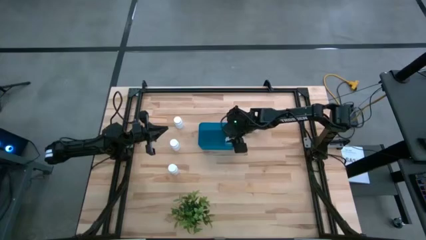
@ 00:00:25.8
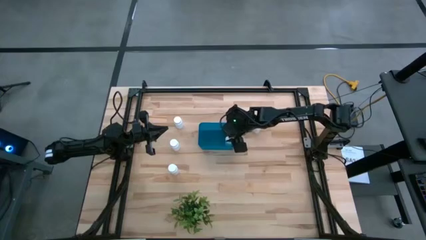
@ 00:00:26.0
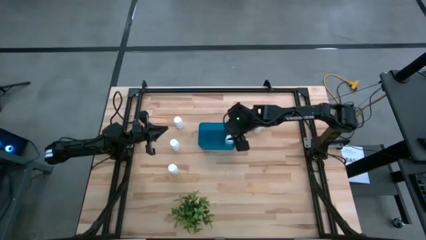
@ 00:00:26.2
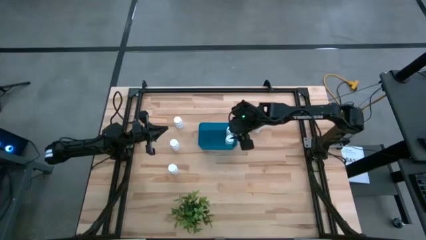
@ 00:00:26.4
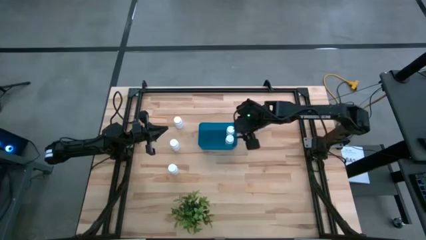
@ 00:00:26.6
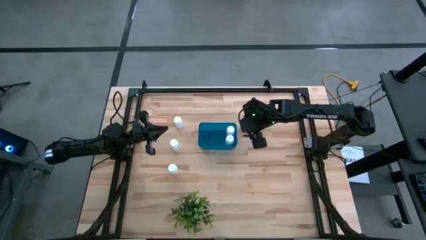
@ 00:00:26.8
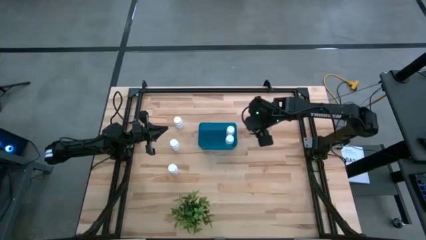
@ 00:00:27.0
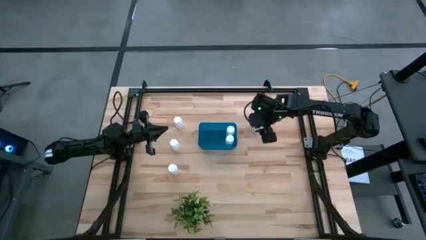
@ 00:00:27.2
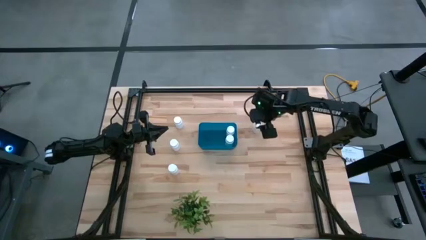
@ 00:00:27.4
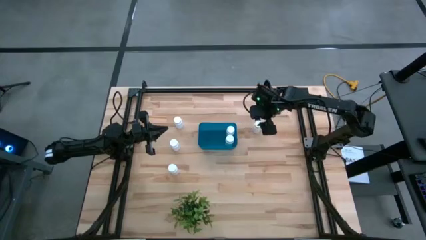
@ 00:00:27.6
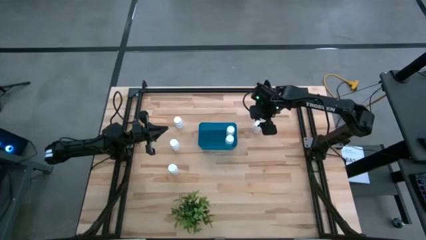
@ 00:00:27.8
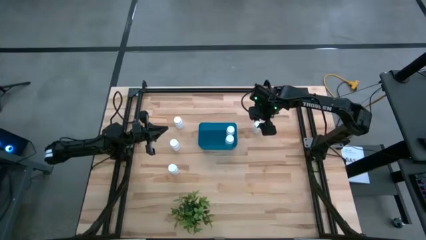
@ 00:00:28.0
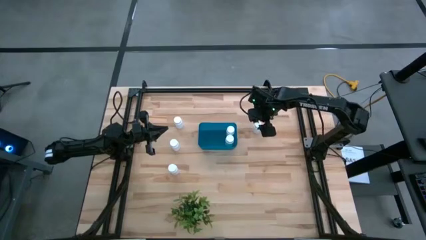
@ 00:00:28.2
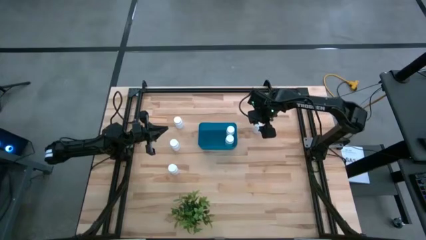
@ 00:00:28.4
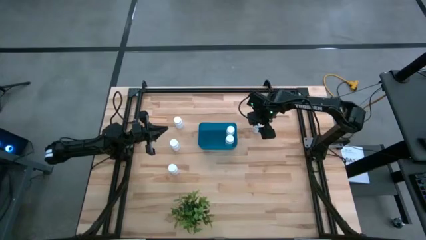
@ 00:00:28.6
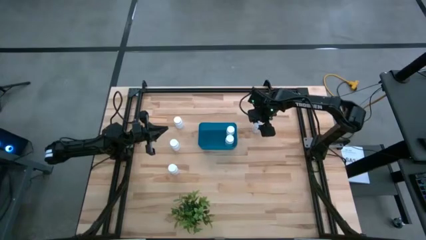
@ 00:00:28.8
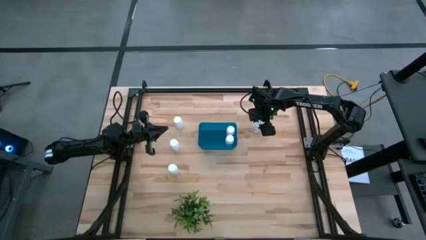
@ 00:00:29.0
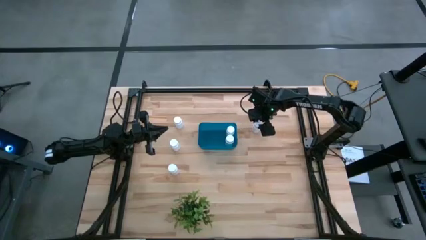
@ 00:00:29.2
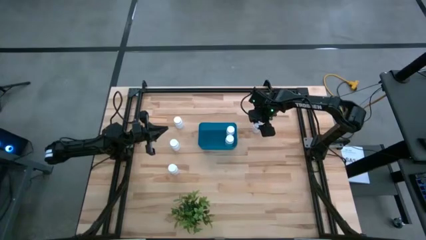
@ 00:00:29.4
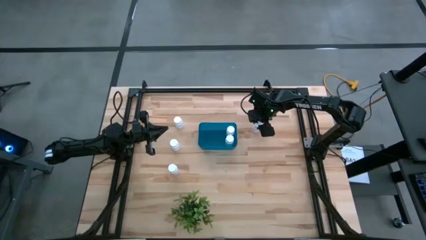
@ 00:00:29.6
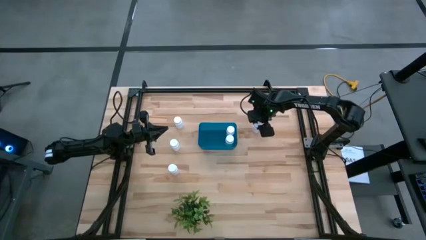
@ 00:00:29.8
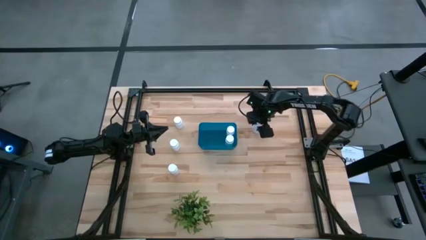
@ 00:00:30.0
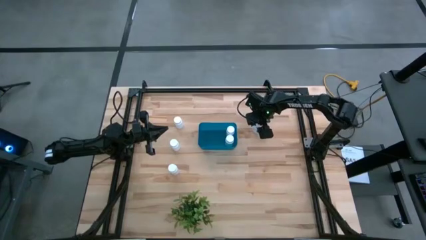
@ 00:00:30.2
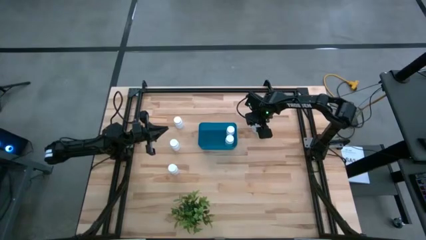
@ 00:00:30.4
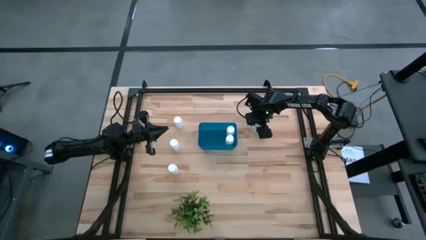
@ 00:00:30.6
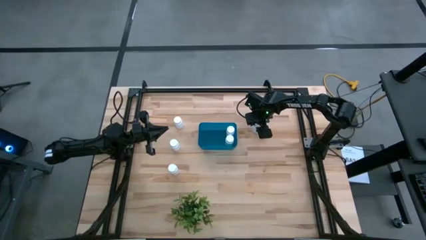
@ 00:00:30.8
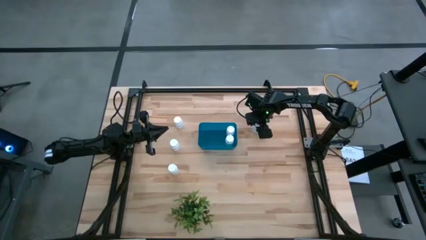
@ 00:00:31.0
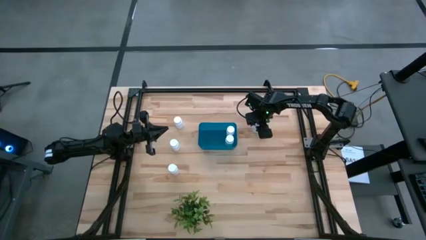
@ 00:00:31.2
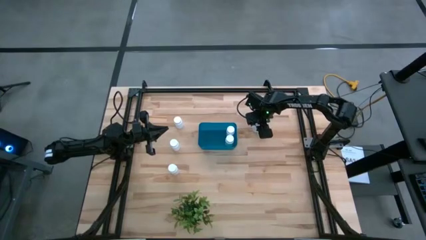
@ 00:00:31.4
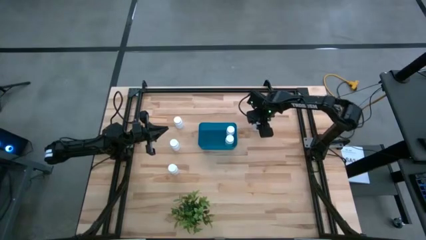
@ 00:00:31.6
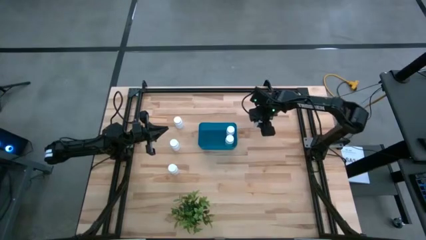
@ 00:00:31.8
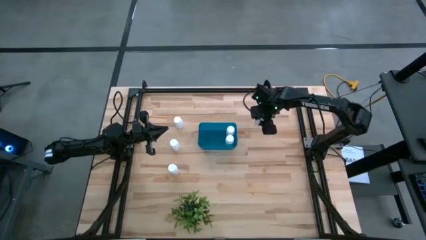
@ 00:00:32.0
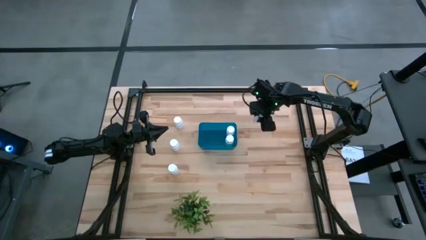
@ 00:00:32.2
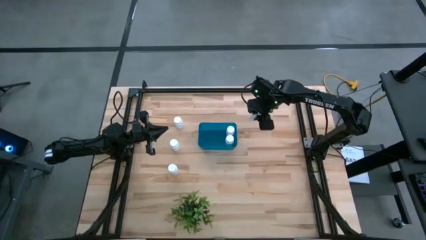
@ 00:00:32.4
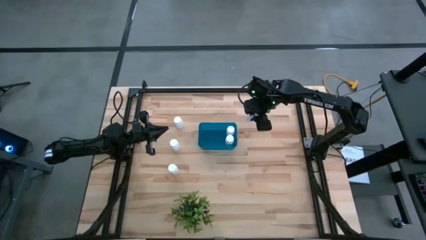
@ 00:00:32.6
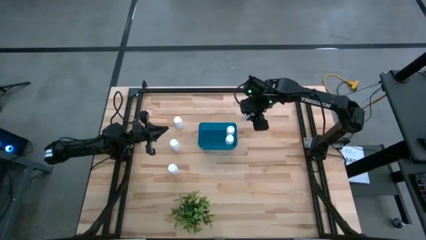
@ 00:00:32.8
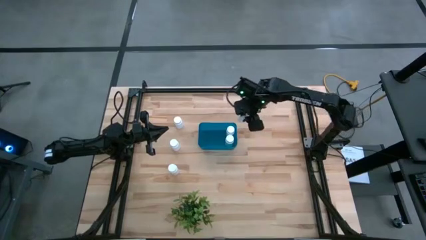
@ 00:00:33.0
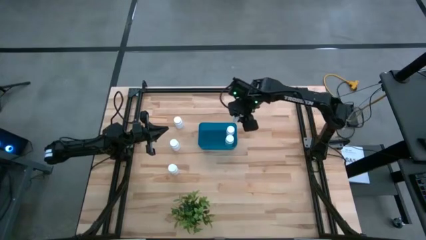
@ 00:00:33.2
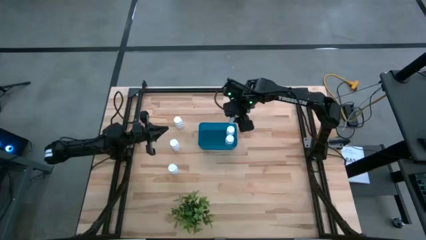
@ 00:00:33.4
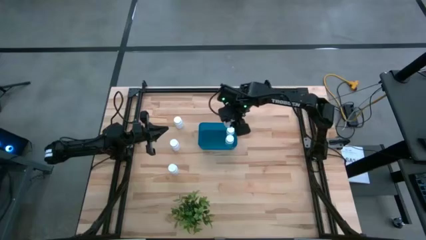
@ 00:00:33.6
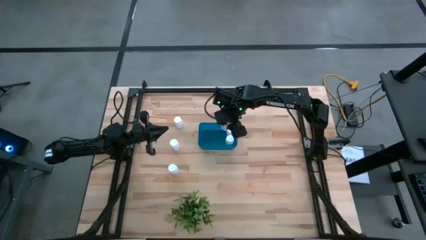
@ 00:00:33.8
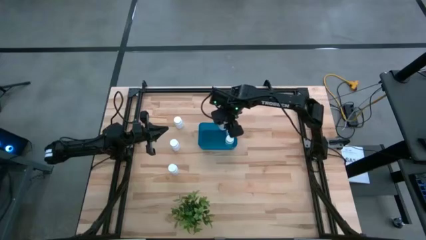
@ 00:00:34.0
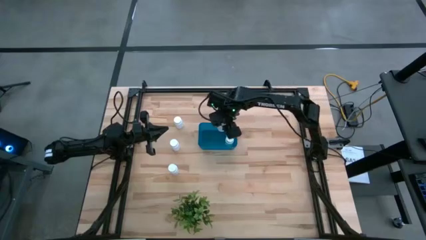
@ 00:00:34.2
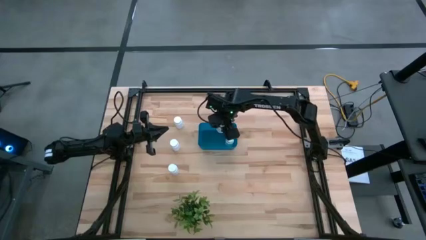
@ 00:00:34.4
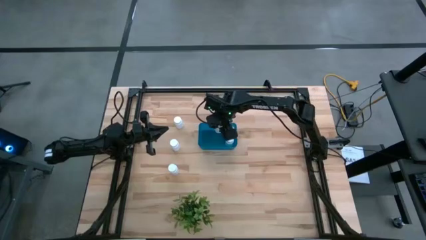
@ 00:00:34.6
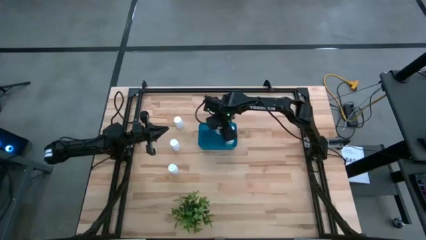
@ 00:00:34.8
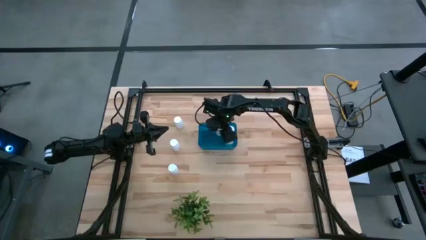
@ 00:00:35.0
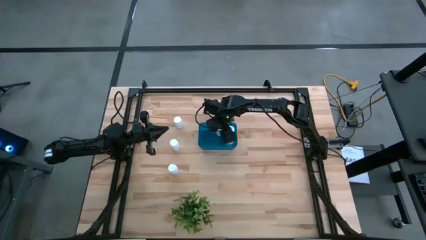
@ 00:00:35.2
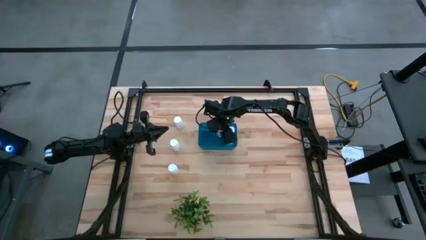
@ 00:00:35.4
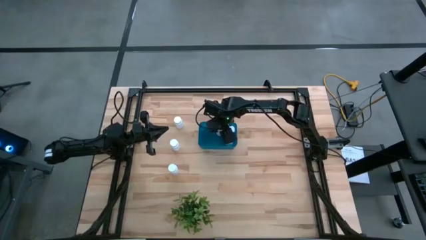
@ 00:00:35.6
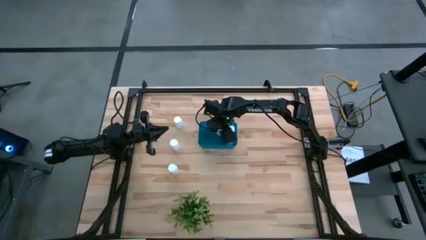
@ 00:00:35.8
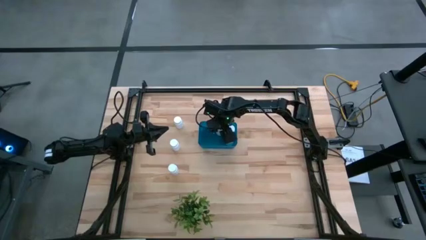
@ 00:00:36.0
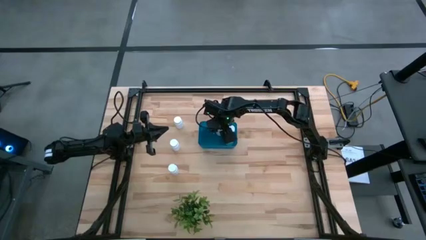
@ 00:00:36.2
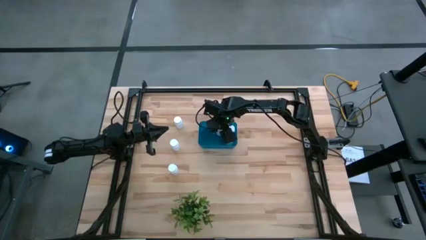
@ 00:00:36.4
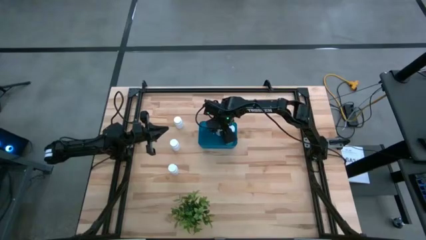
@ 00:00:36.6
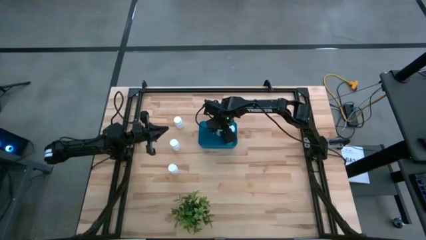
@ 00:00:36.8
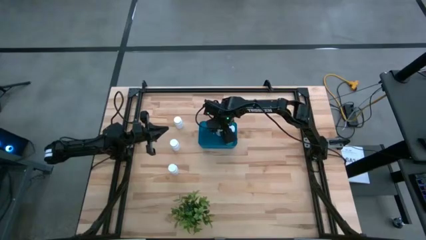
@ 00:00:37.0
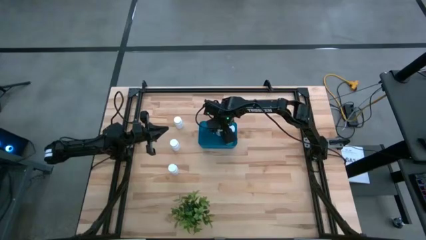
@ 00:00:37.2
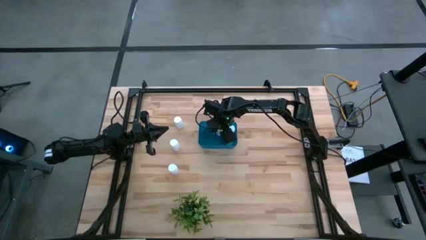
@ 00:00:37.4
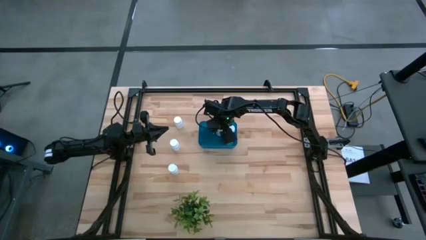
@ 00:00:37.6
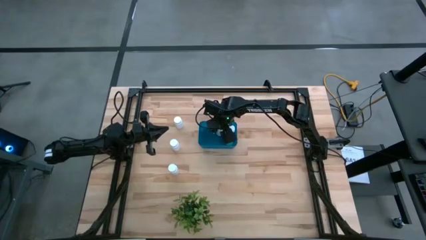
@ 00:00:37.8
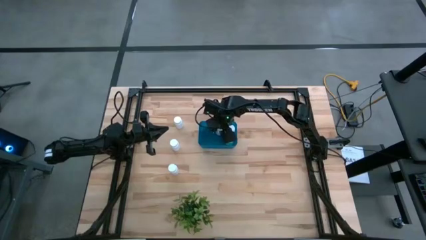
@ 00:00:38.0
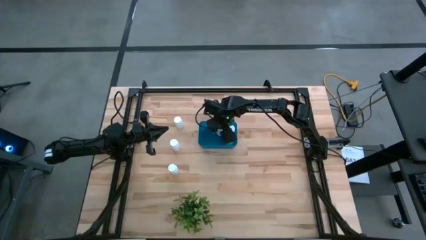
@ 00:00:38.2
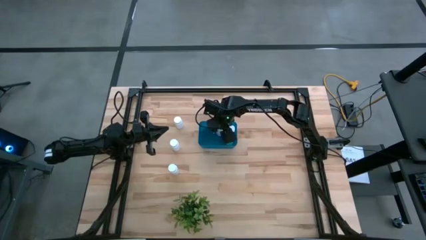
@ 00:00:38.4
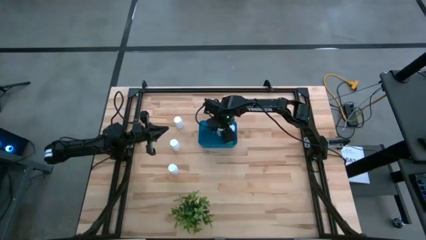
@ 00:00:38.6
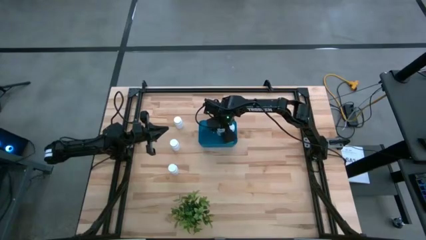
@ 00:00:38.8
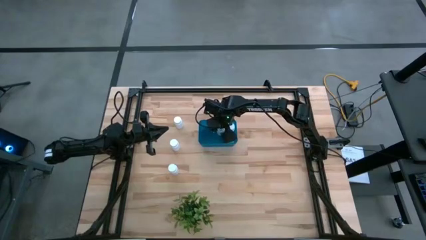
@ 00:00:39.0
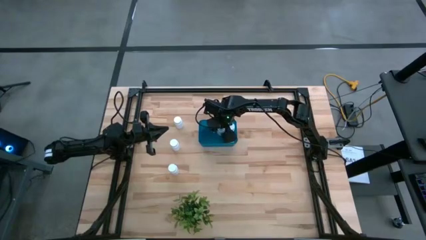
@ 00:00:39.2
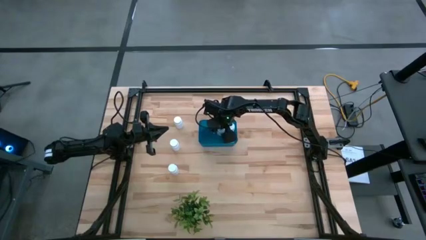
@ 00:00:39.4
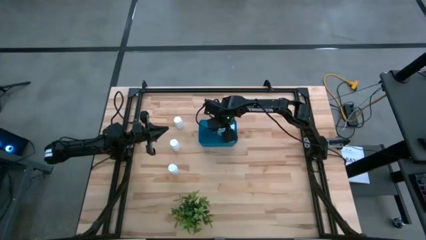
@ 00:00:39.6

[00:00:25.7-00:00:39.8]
Task: Pick and place pill bottles into a basket
Put the white medicine bottle into the blue bin
